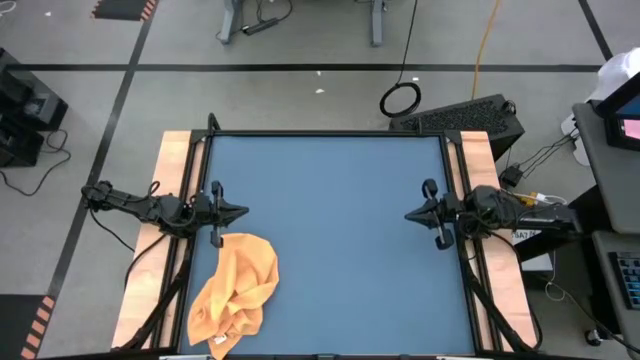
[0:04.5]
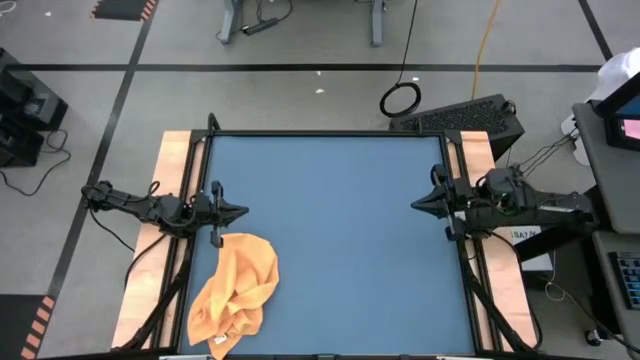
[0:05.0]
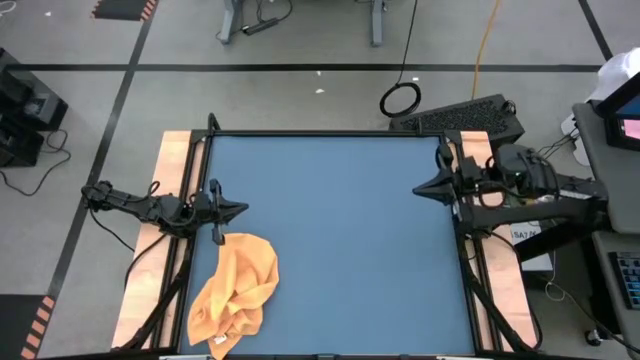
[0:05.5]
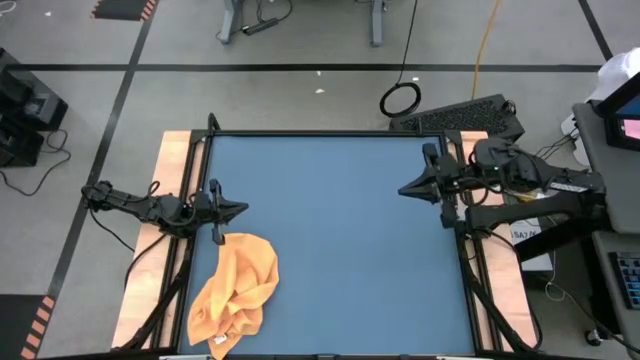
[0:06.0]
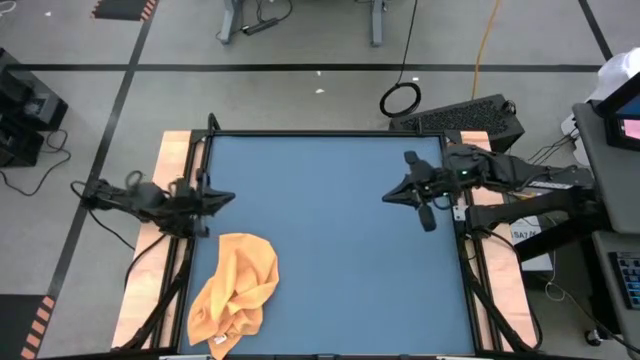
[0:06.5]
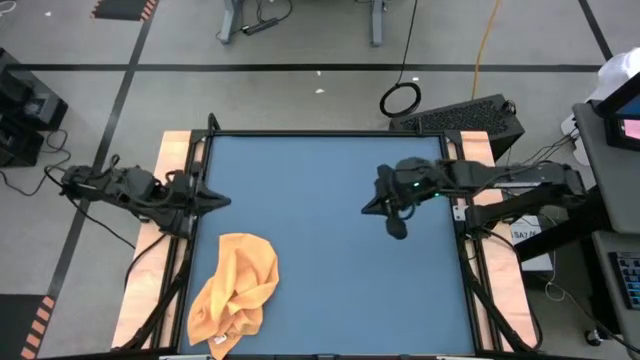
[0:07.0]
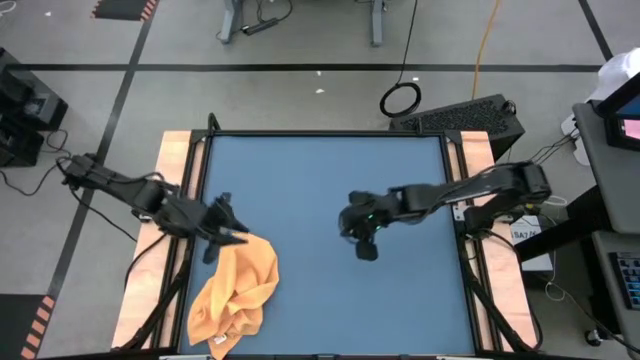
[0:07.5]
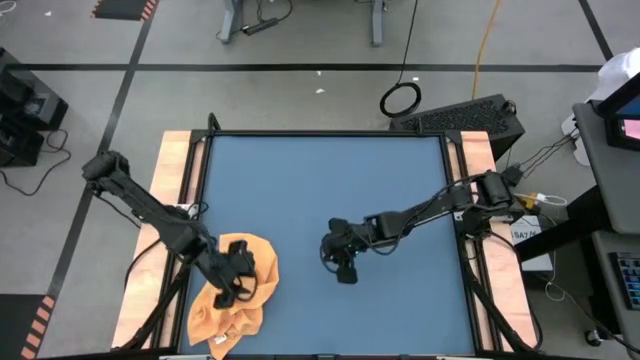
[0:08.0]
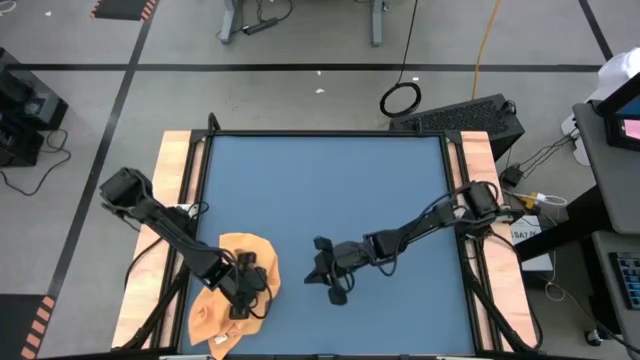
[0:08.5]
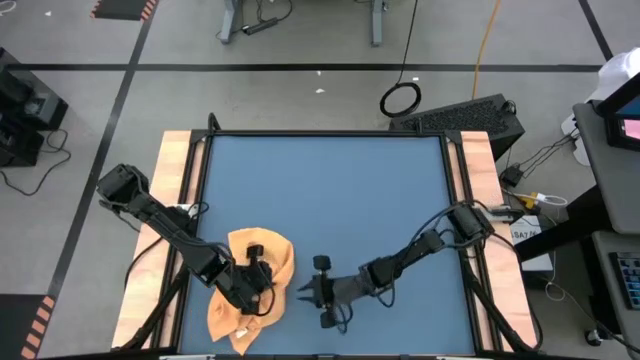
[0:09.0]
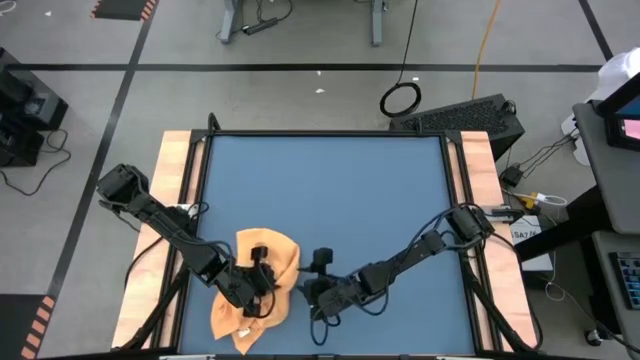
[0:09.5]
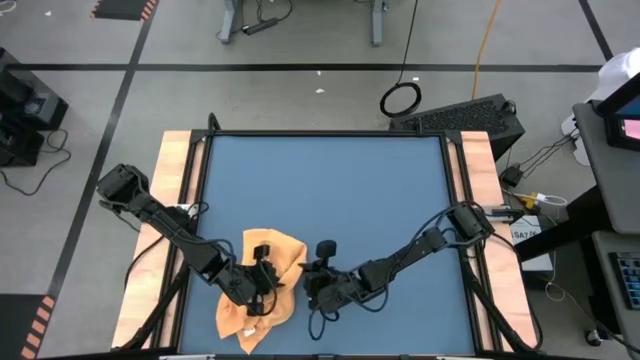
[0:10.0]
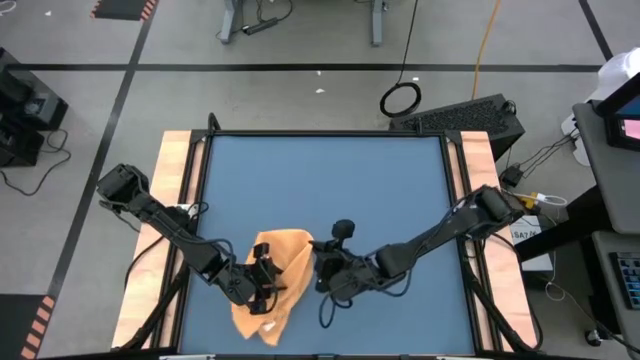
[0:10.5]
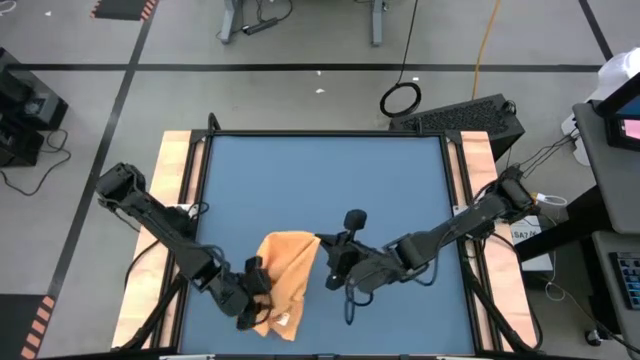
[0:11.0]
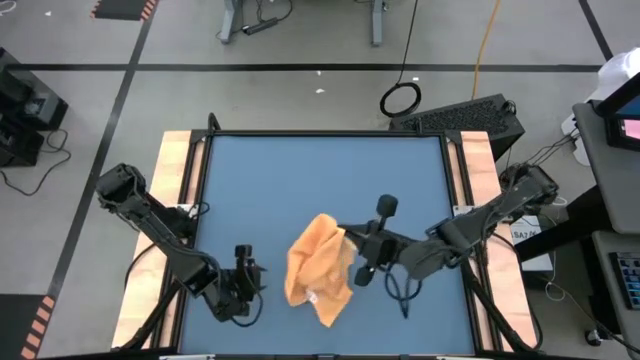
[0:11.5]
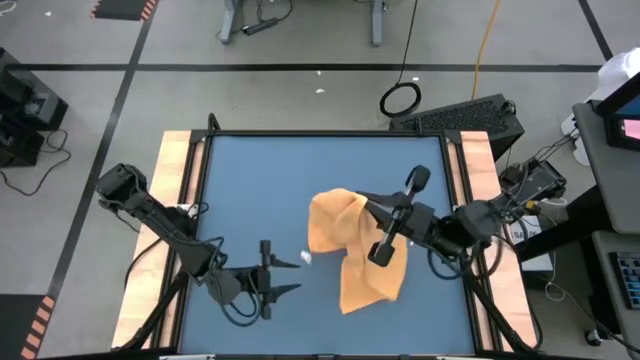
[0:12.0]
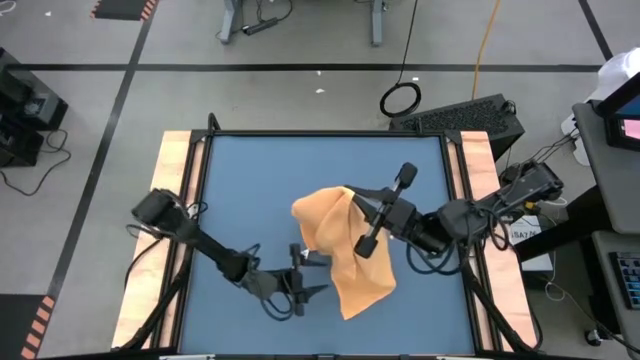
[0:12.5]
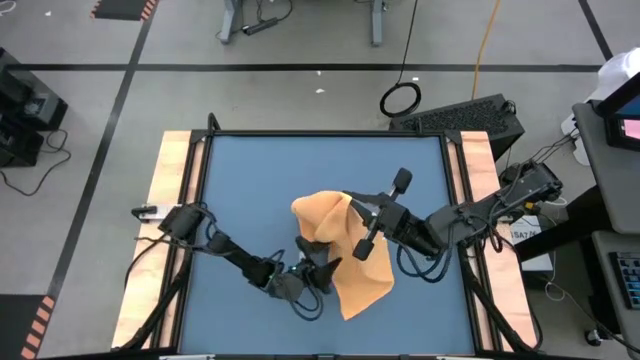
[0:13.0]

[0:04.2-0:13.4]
Task: Roll towel into tight, uniform cylinder
Fold the orange microfiber cloth

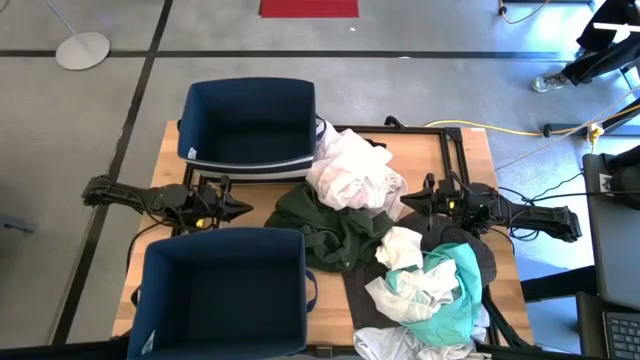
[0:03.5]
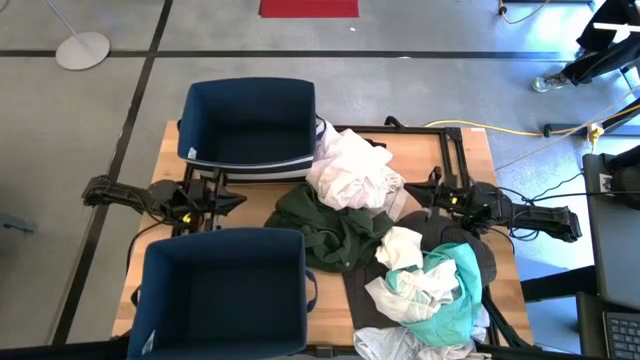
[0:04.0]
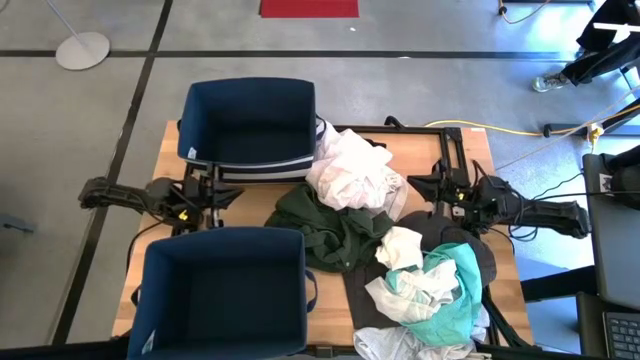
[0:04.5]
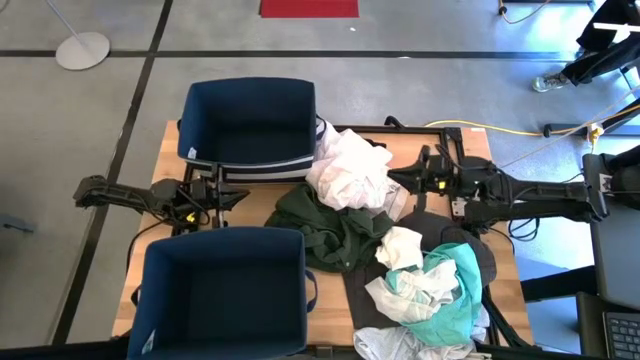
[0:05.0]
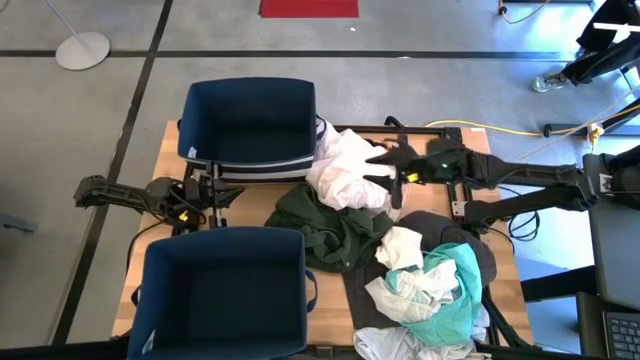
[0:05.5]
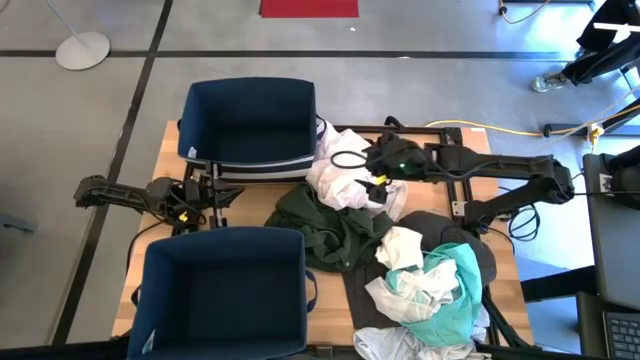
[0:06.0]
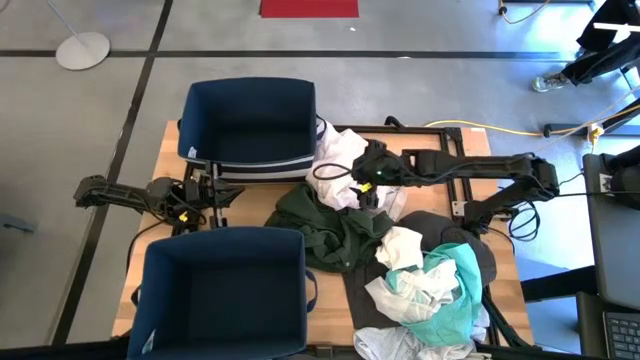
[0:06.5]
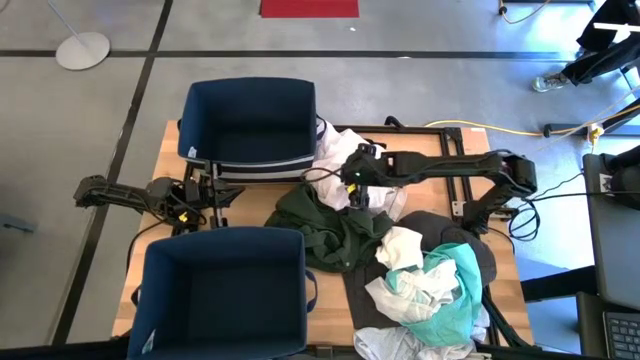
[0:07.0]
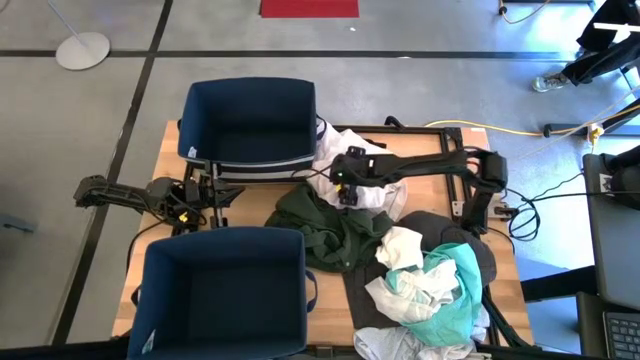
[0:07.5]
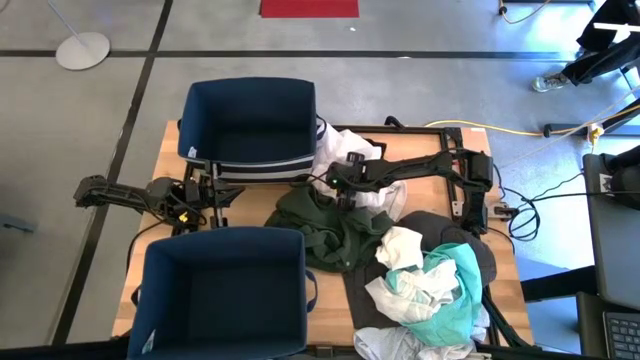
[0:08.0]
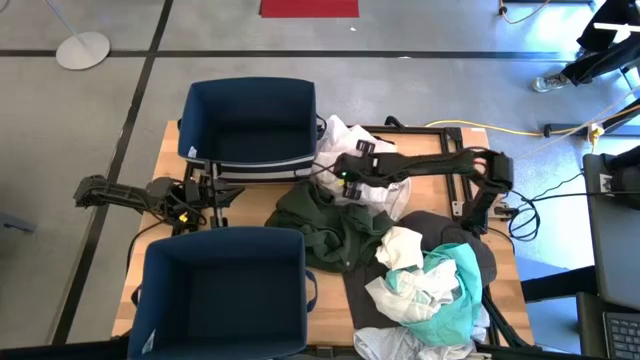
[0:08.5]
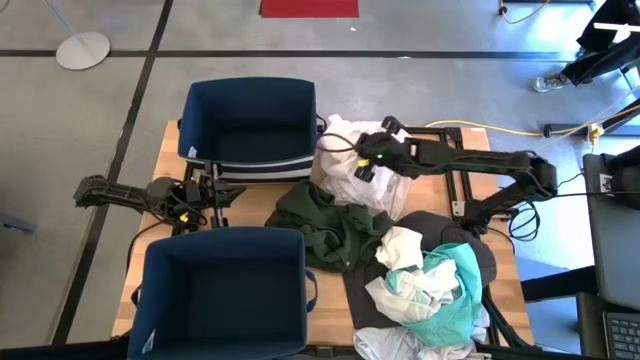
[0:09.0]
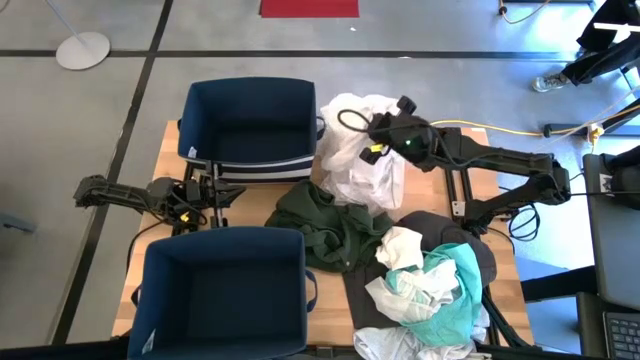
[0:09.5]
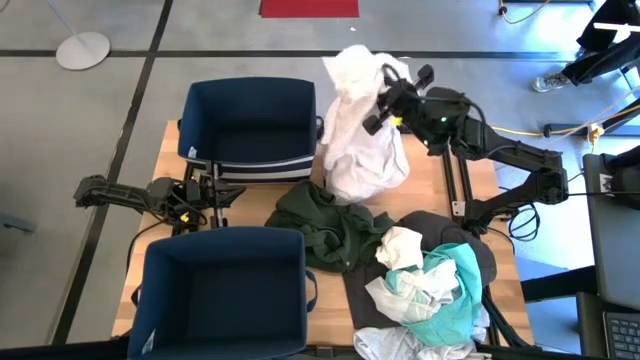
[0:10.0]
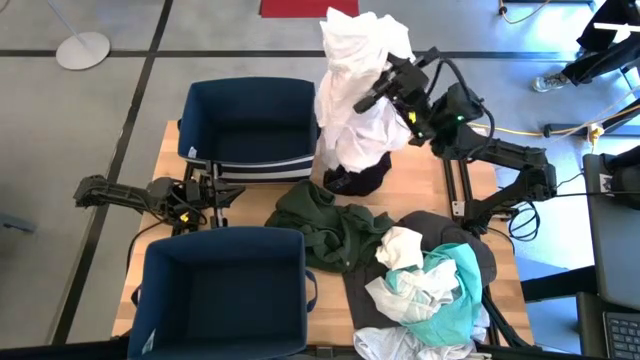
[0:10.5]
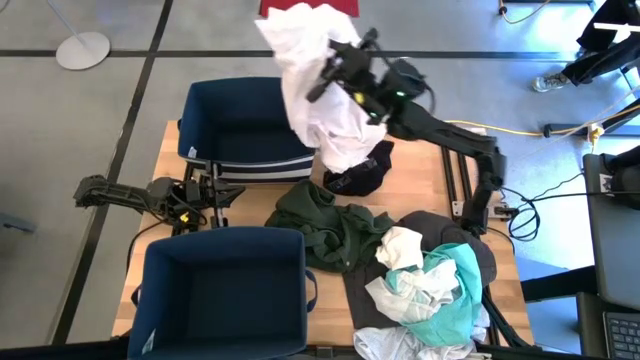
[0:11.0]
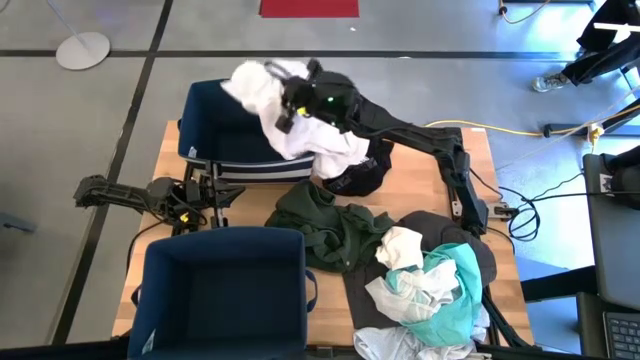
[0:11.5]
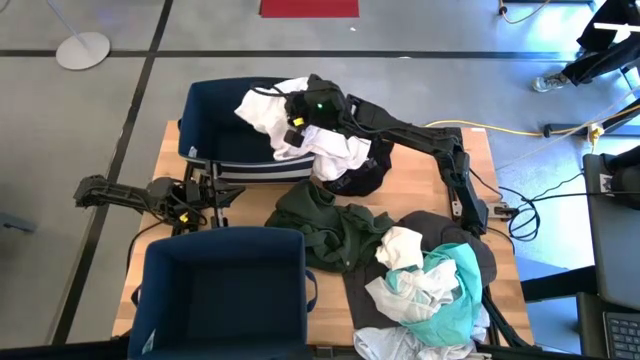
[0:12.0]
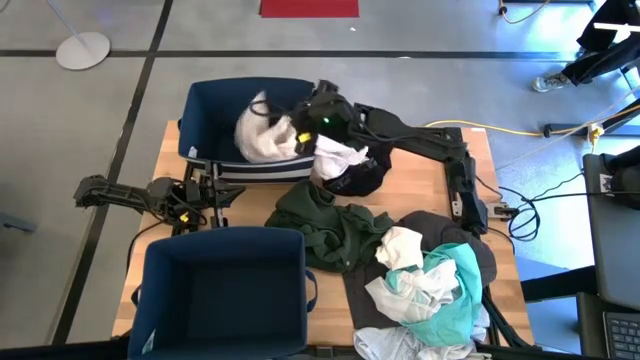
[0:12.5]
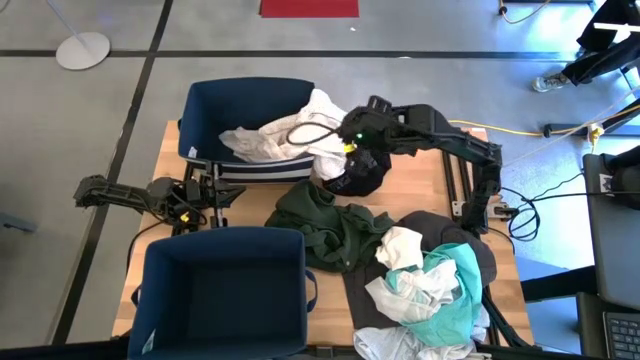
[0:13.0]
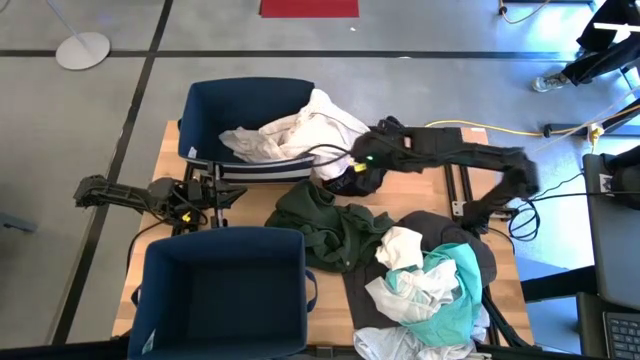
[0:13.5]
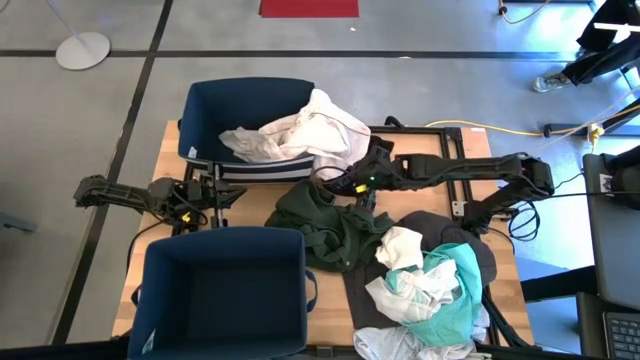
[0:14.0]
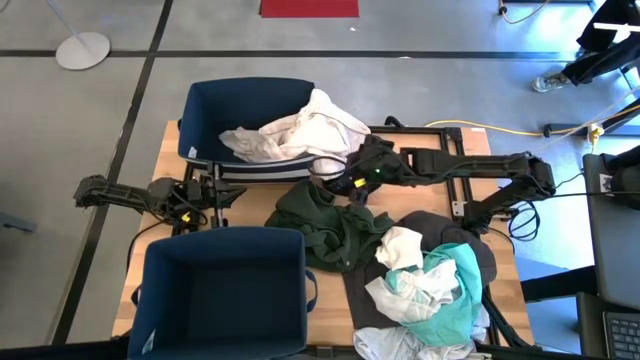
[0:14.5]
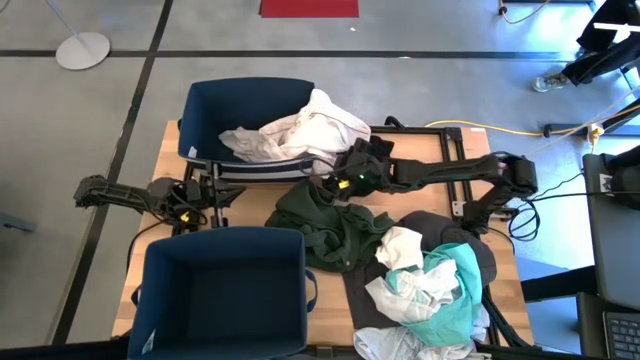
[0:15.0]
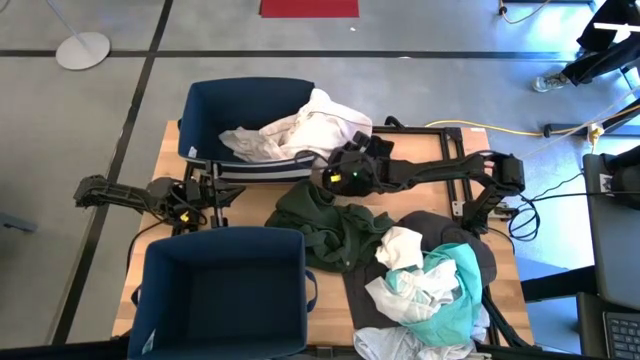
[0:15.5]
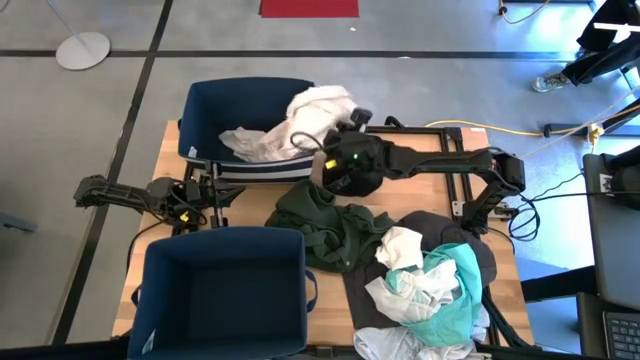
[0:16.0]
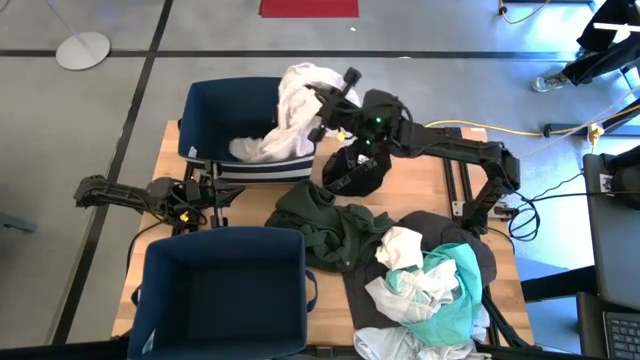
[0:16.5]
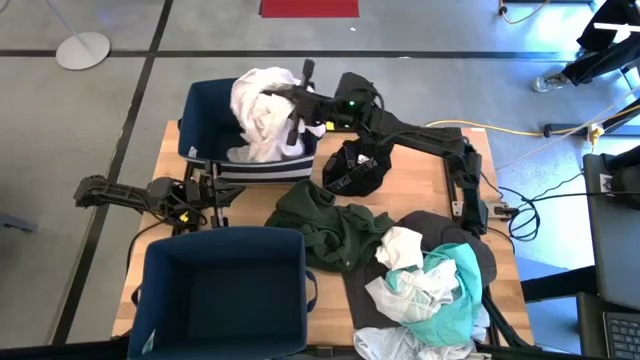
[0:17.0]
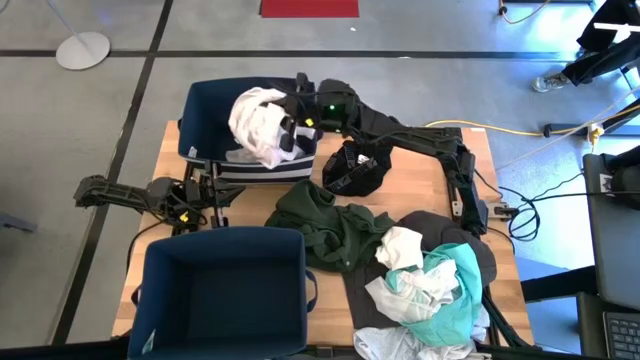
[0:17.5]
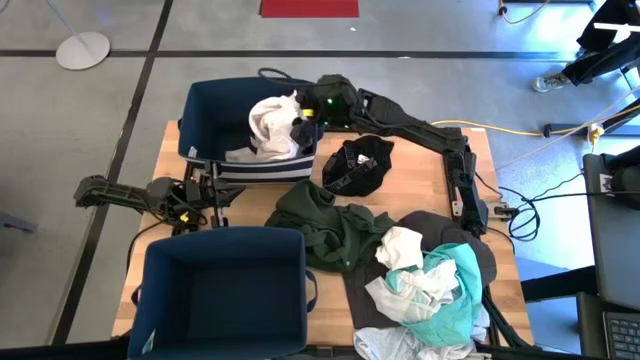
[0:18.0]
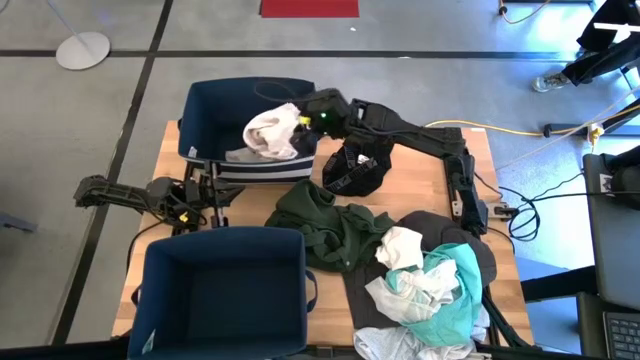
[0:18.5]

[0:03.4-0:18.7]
Task: Sort clothes
Put the white polo shirt into the top blue laundry bin
